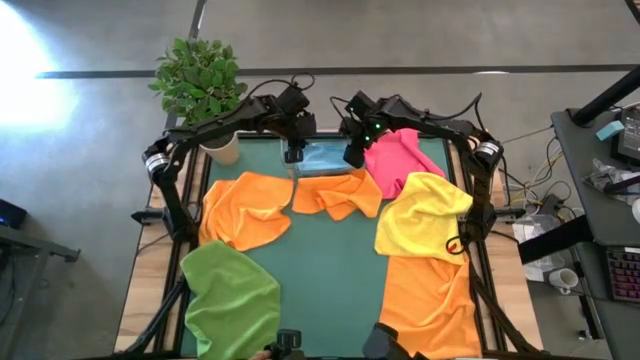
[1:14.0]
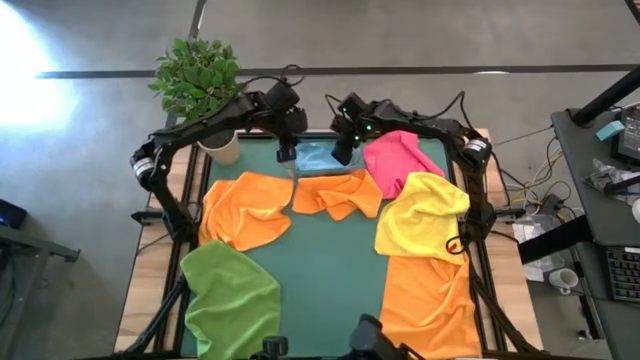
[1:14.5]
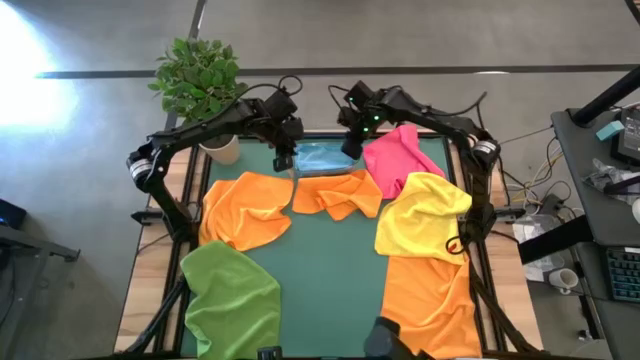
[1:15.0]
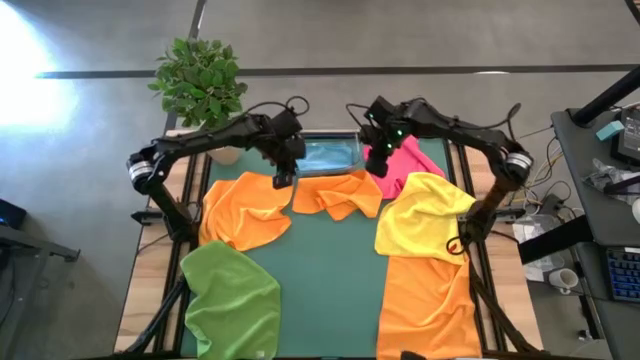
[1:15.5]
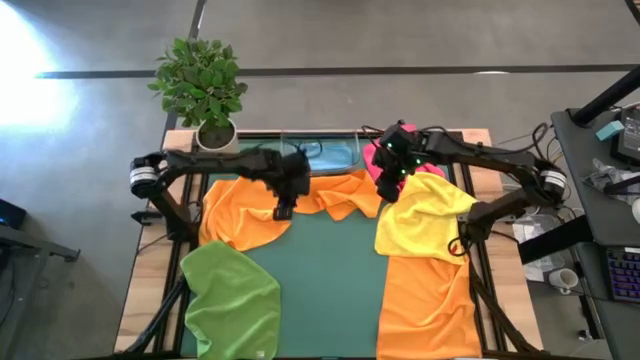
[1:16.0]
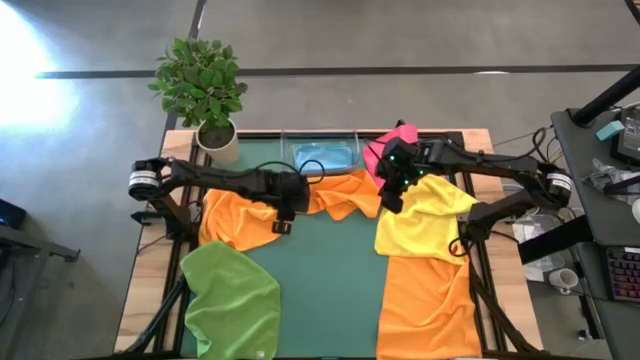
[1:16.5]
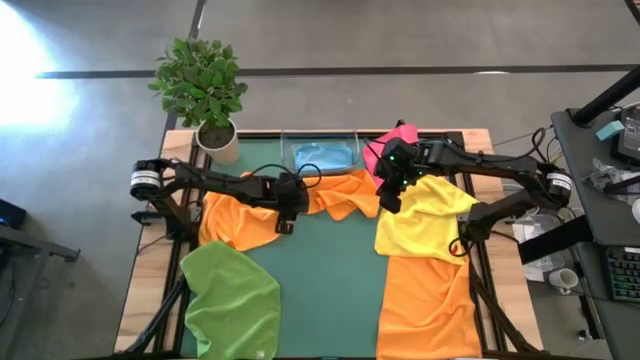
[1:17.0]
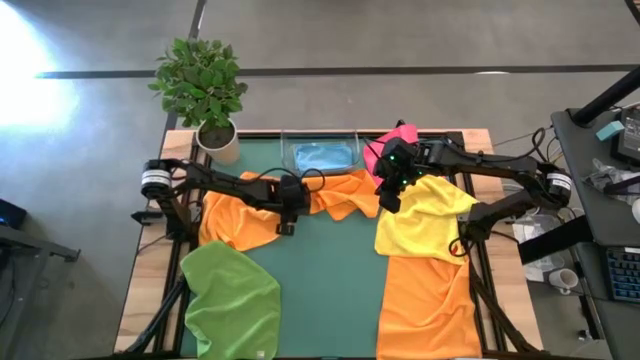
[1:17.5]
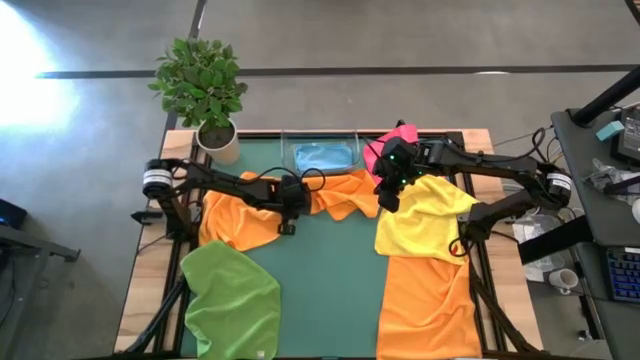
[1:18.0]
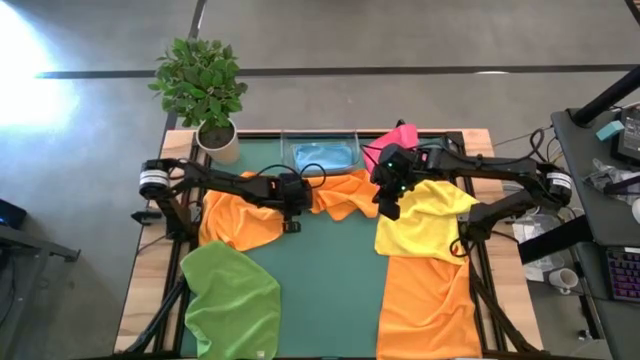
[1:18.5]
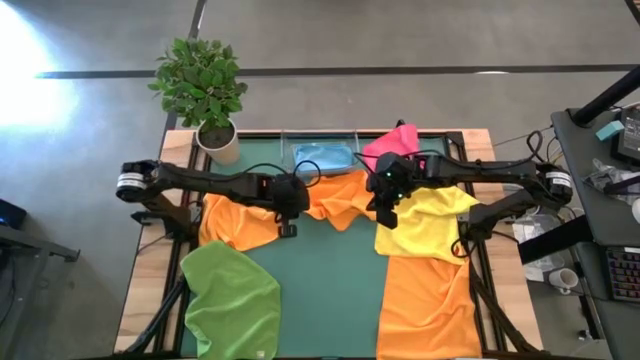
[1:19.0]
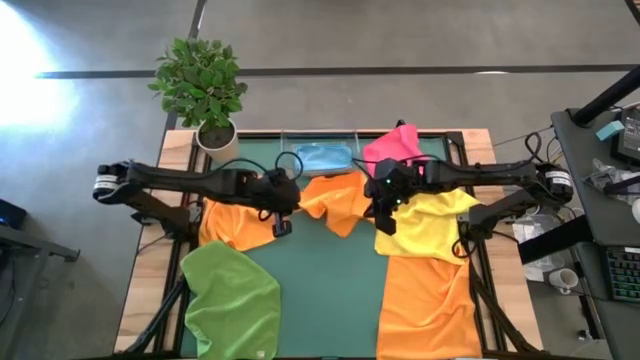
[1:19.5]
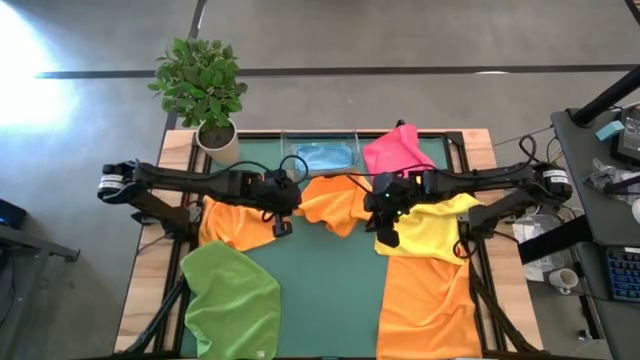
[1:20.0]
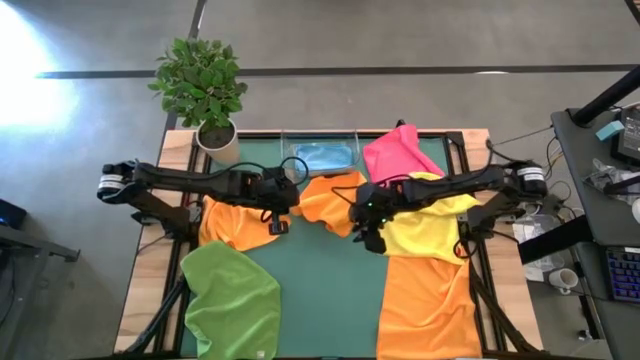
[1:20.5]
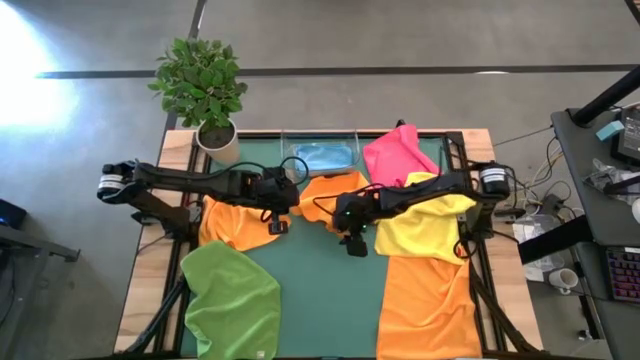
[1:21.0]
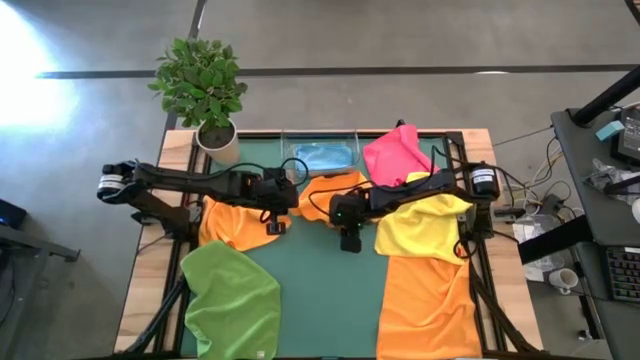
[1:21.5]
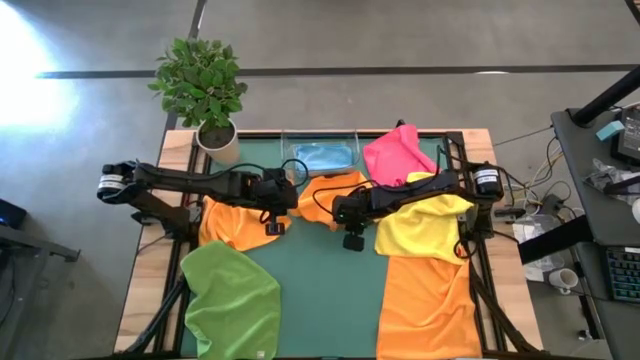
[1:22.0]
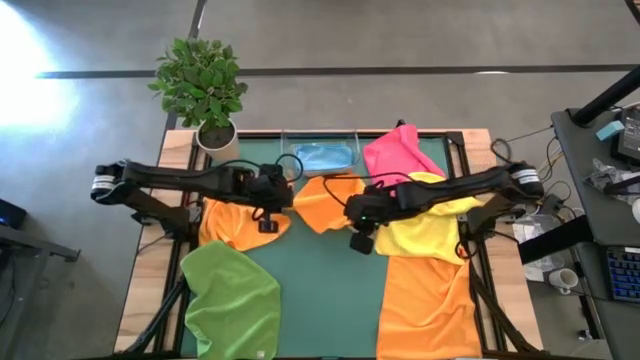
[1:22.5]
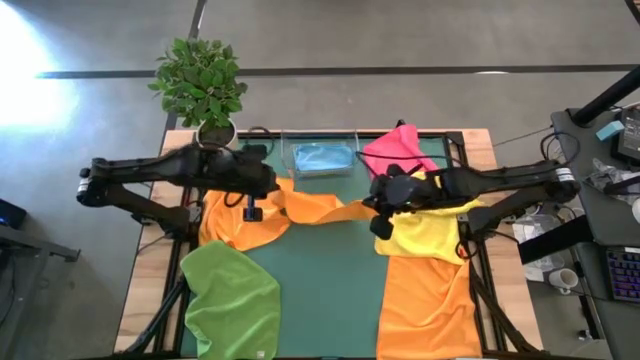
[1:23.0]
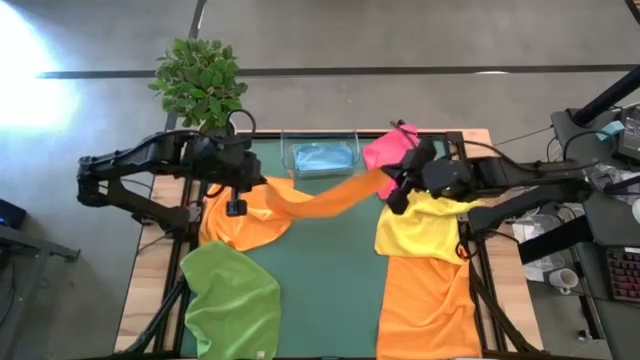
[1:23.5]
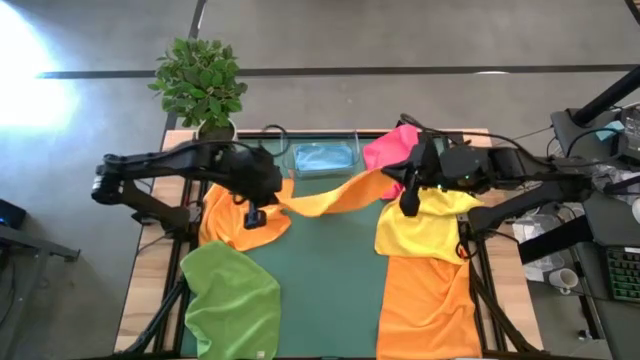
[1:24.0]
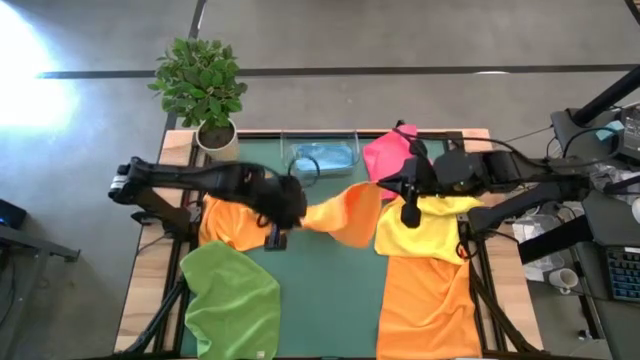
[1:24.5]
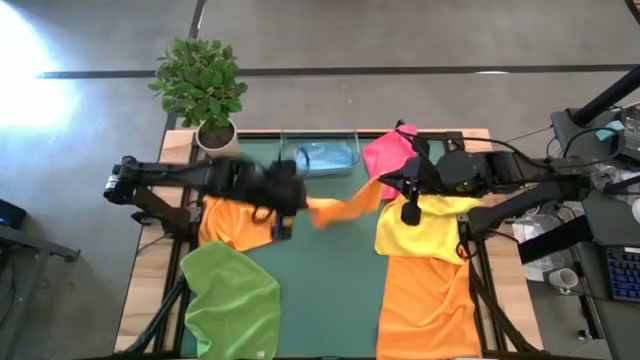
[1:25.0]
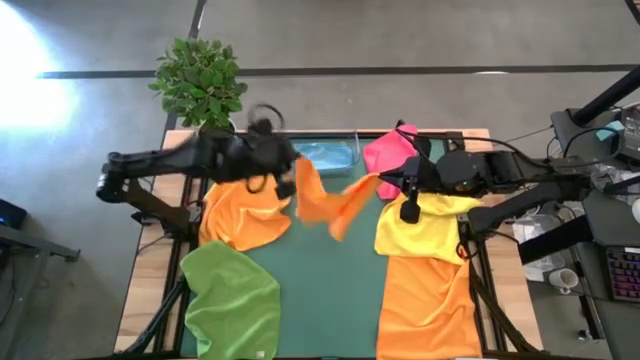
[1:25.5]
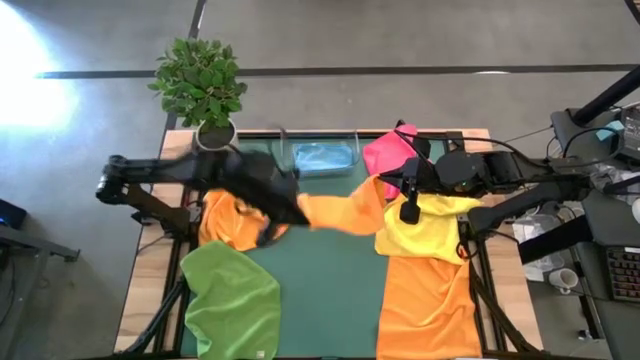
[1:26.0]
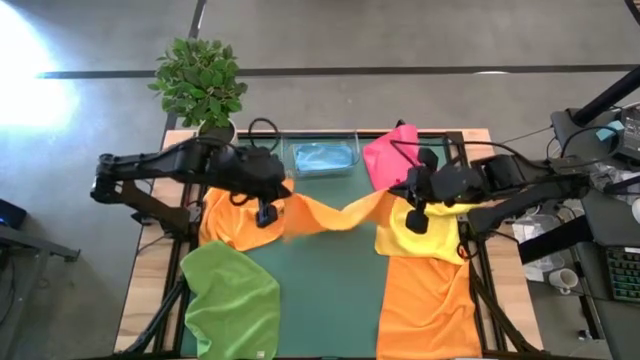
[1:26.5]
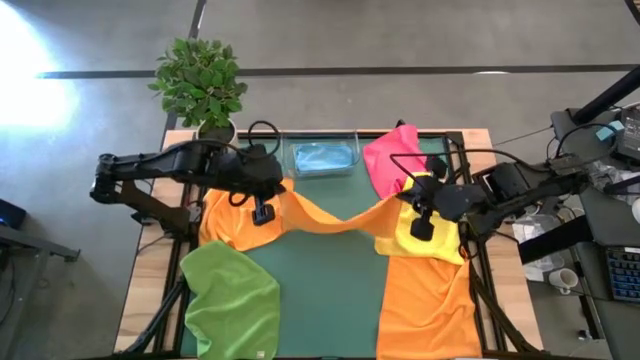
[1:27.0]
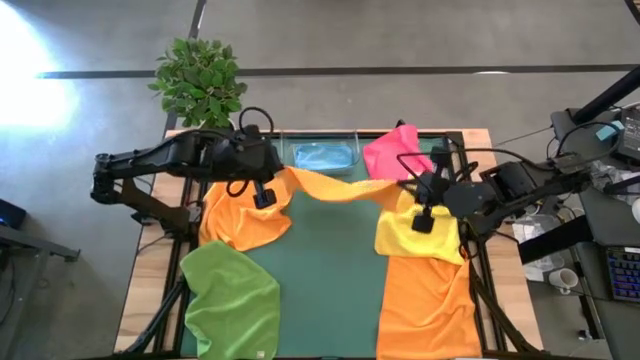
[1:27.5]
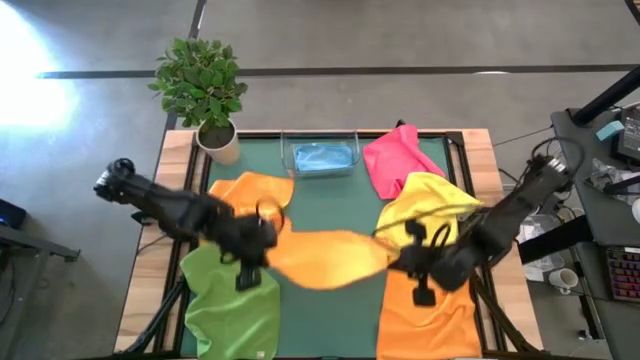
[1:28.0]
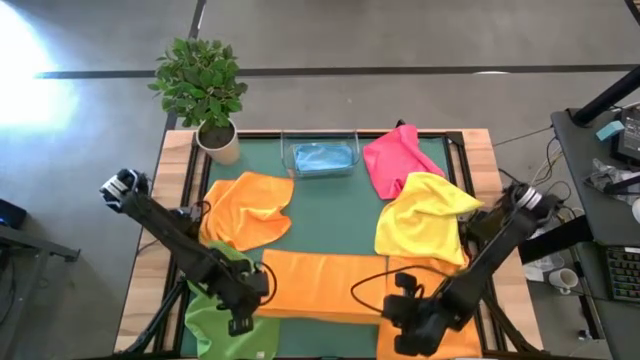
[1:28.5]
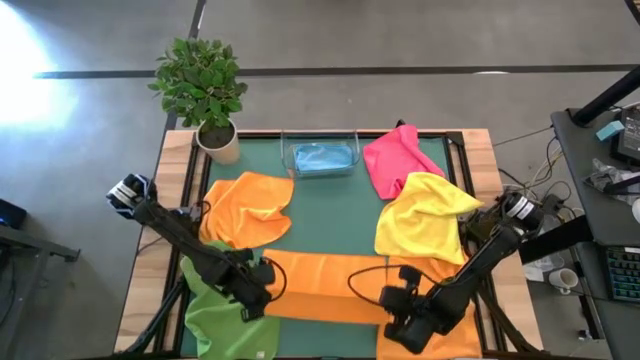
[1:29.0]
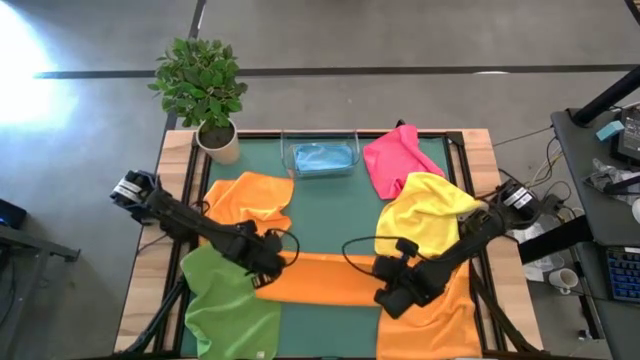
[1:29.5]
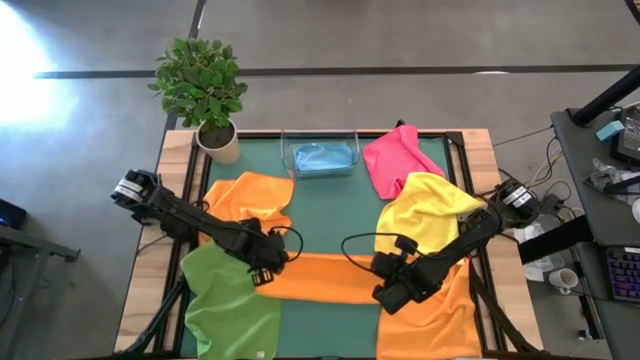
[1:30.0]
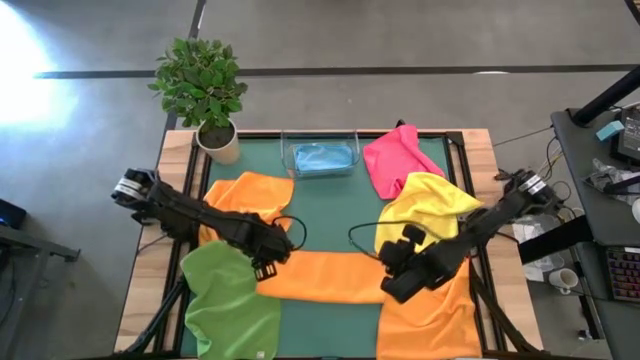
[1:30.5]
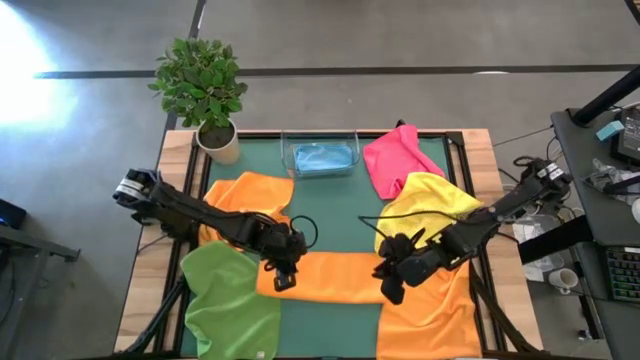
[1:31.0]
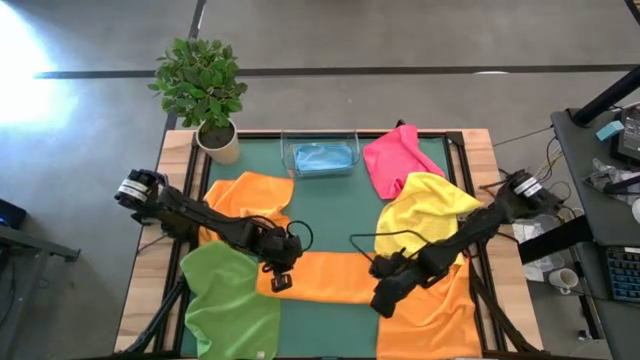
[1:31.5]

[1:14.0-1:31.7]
Task: Fold microfiber towels
Fold the right orange microfiber towel
